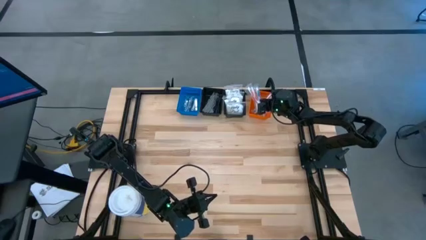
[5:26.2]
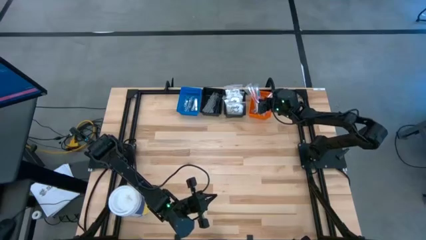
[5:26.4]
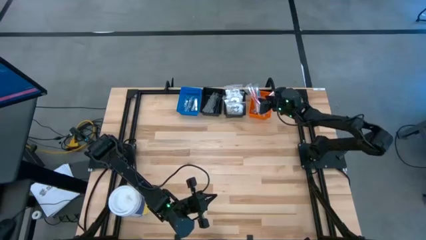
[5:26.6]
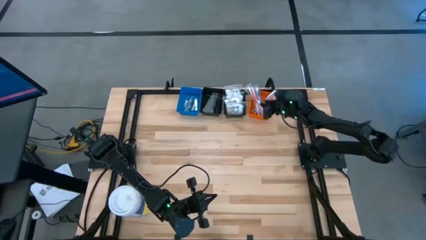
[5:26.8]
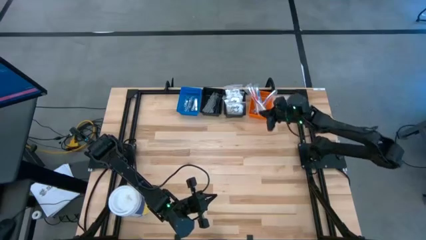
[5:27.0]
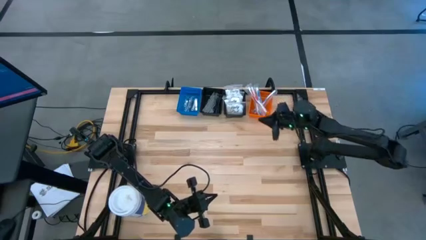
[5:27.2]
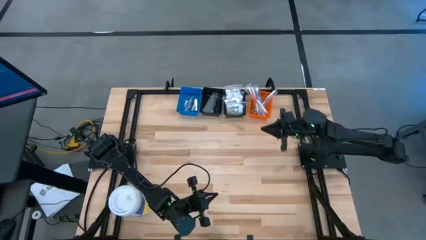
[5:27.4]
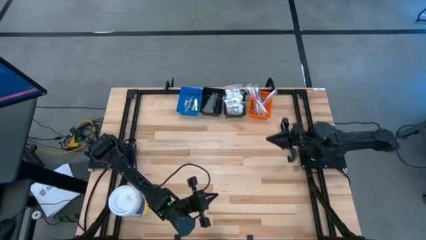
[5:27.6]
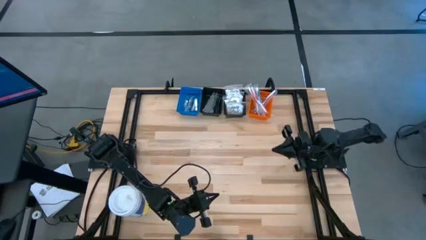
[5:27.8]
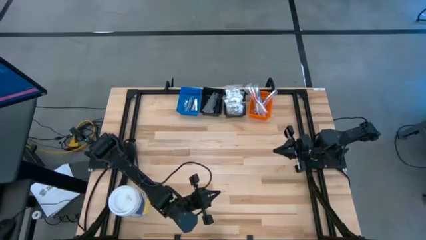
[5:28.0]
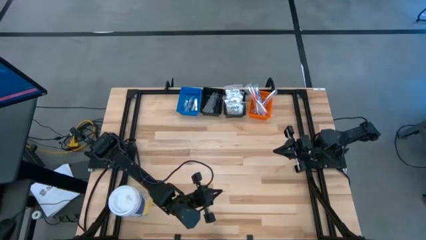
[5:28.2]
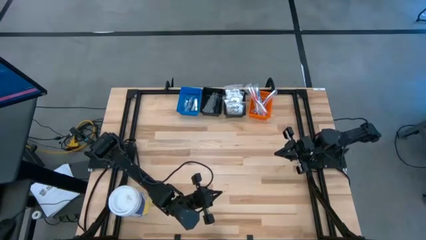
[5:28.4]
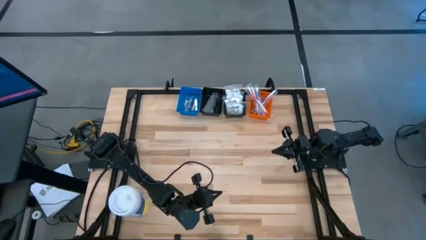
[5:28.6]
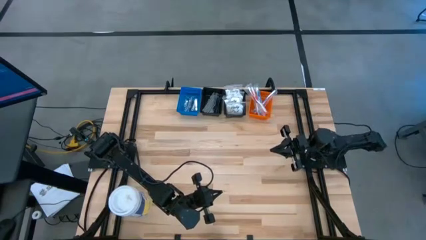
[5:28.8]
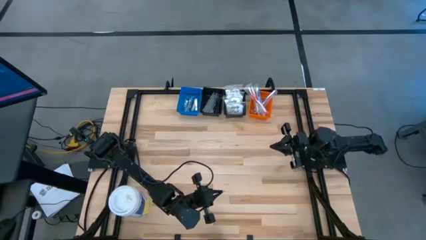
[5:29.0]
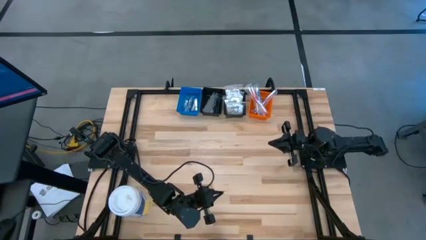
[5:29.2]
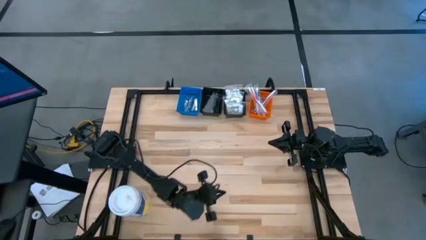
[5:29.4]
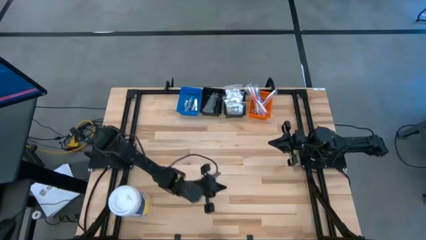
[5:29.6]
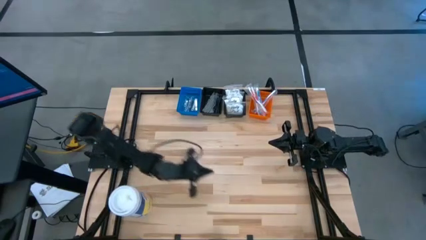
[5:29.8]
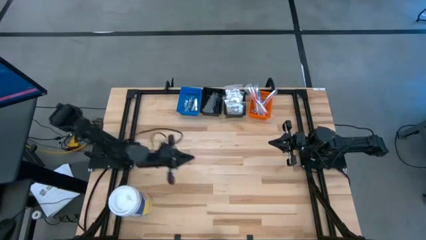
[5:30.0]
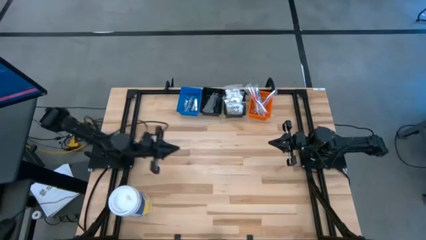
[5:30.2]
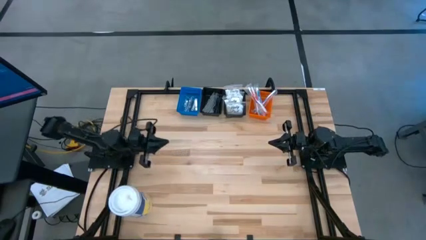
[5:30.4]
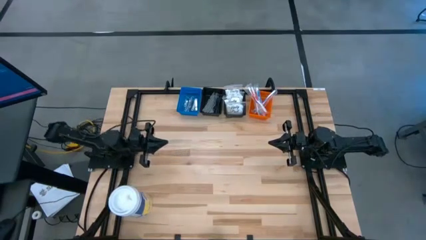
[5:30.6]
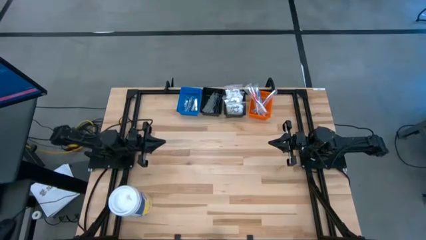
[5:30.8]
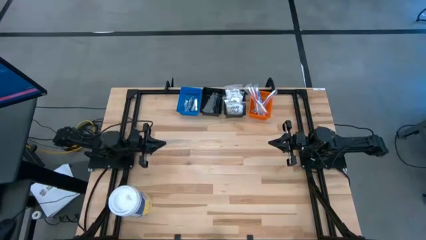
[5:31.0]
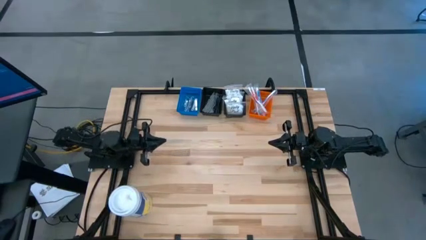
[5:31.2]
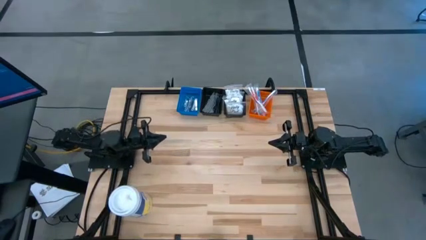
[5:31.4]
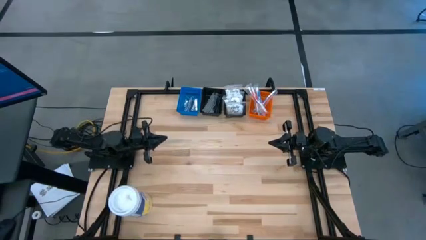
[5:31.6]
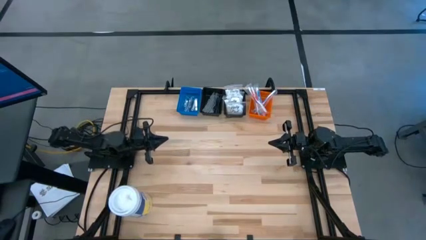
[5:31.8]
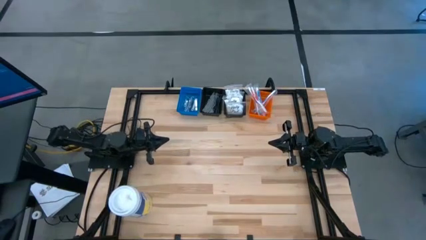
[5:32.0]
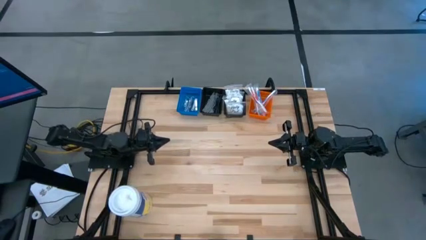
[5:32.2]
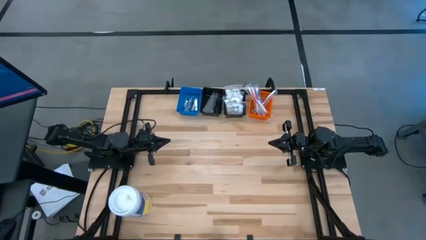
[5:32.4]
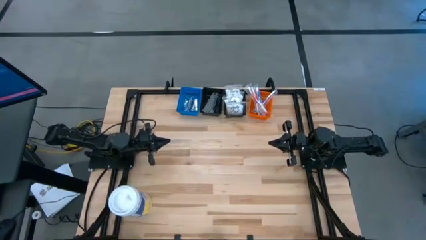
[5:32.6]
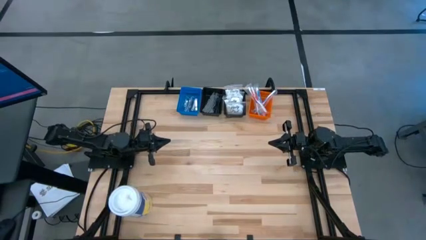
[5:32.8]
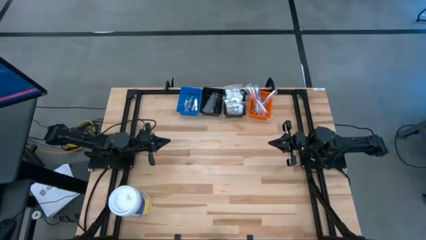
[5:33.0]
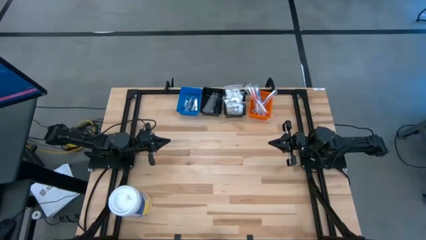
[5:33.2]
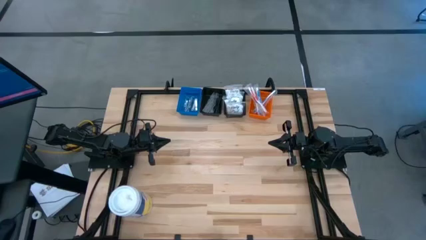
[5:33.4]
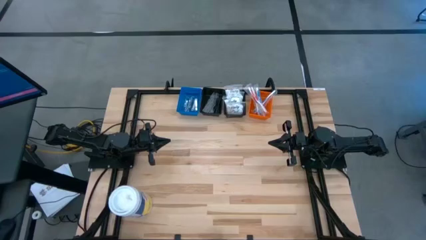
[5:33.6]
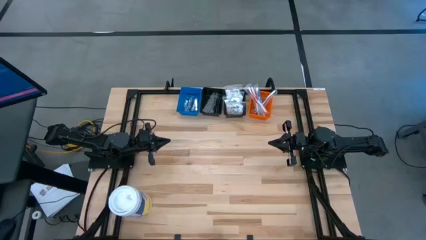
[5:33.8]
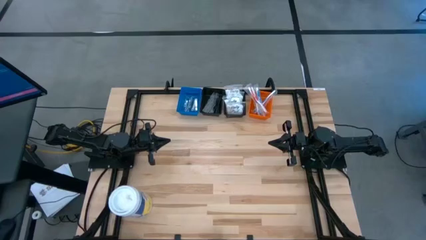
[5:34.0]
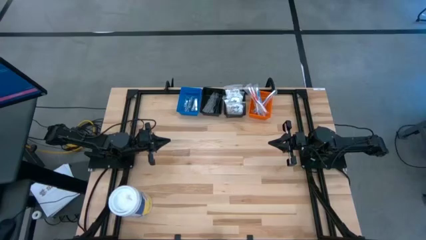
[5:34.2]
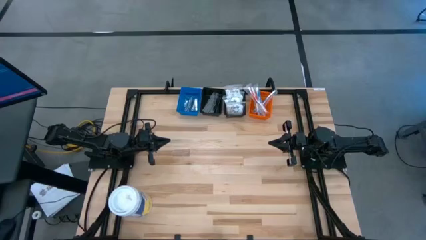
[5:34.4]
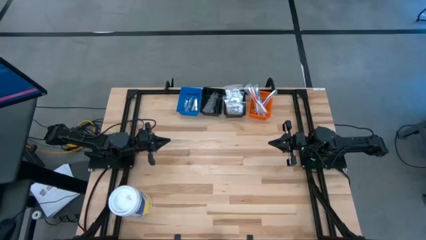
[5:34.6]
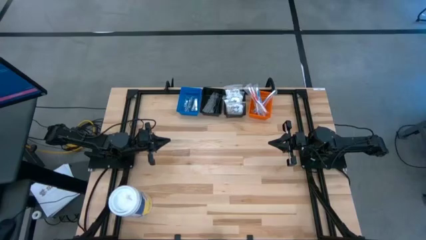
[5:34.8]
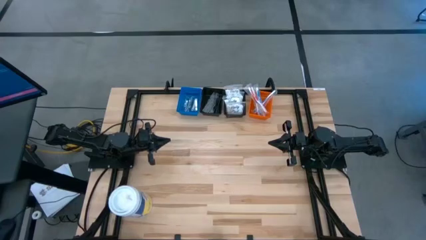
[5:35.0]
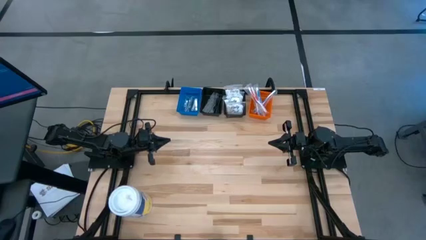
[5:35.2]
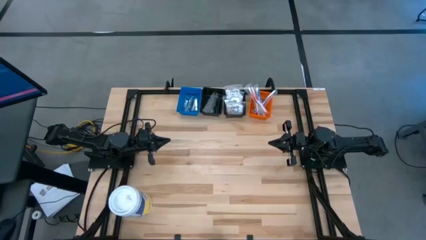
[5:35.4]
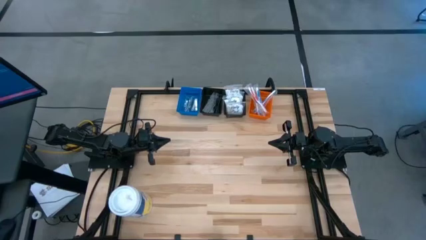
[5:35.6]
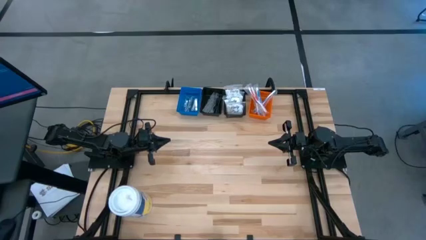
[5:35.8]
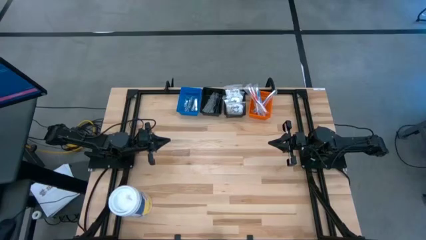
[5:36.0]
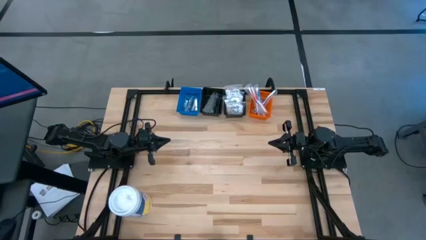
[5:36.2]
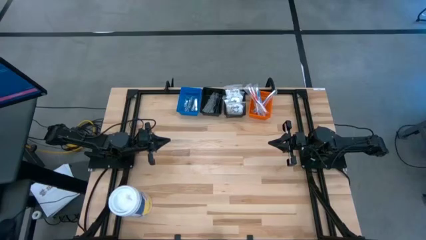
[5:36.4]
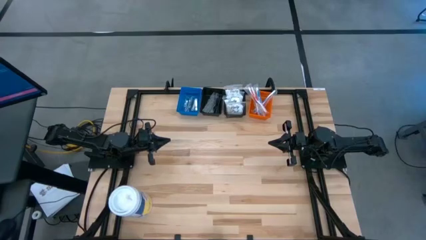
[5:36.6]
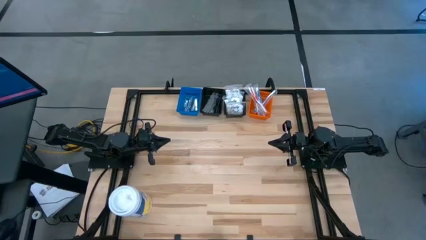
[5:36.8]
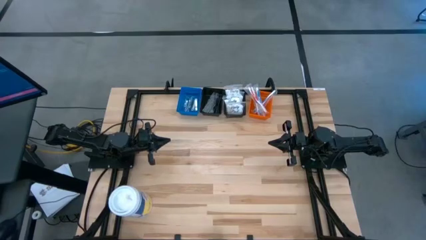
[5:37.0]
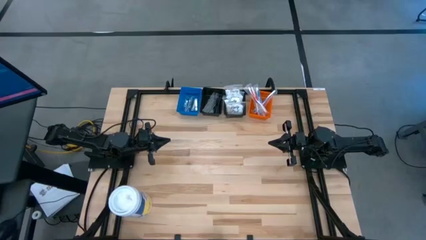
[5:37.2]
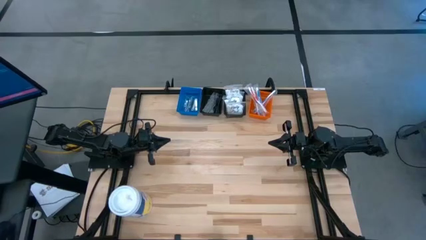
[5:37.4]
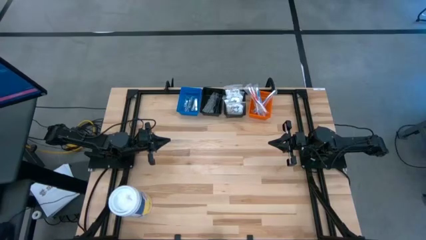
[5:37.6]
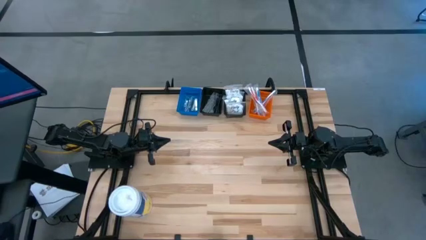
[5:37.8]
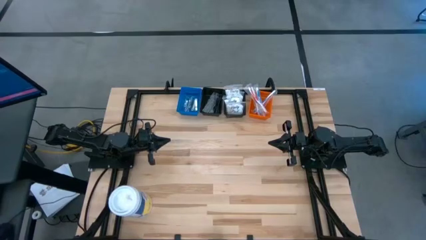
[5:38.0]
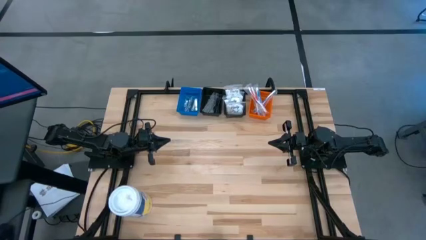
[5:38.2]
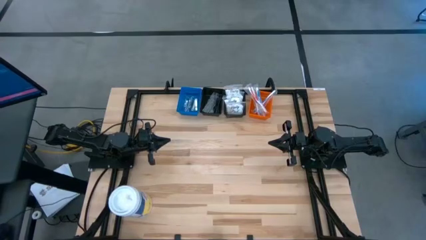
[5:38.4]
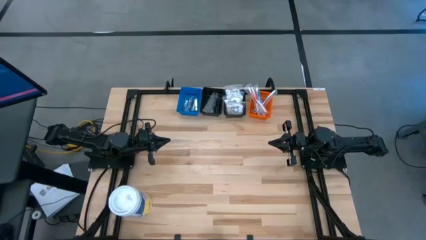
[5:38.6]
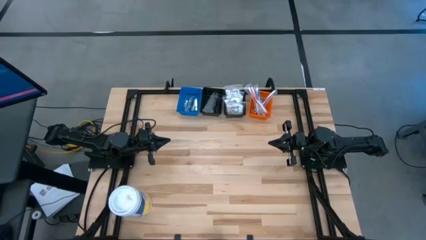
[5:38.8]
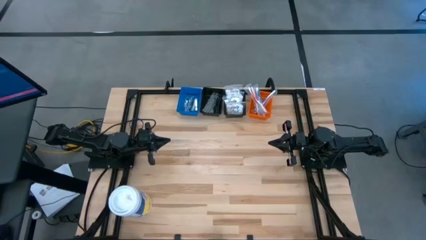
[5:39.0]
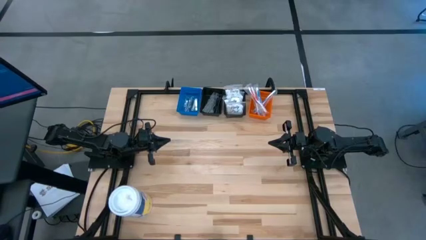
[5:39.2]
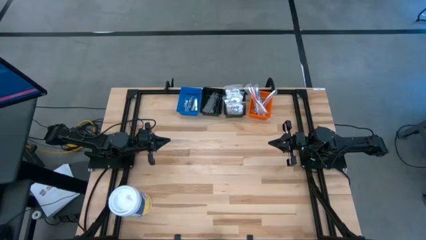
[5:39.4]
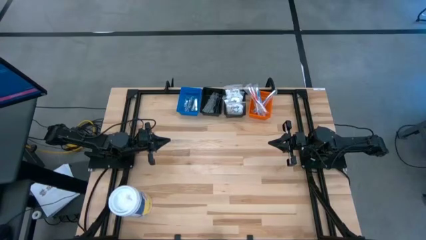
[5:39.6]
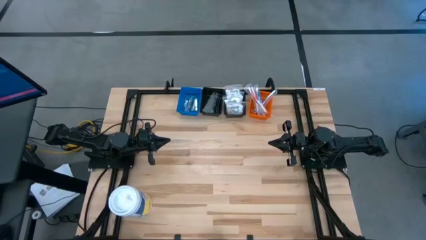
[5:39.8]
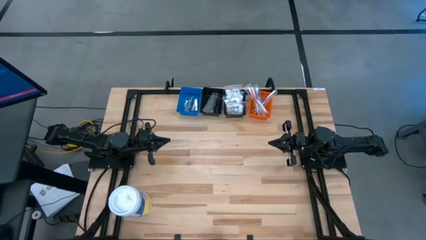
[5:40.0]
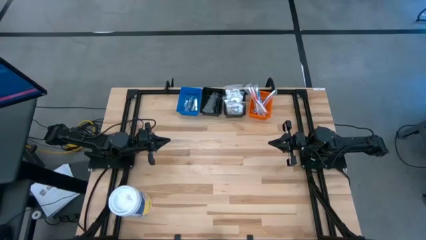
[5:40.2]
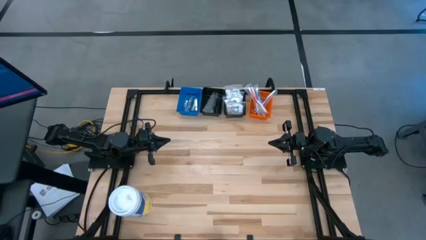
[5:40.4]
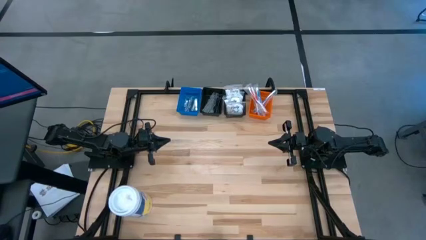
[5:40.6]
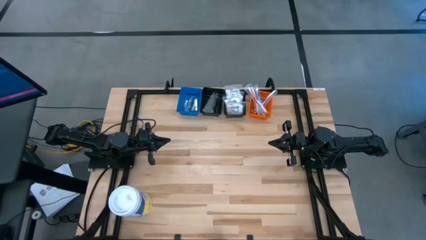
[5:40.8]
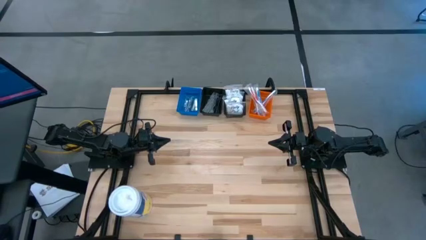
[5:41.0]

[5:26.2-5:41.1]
Task: Pick & Place Travel size toiletries
Return to Home Position
